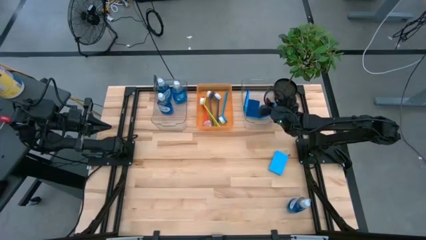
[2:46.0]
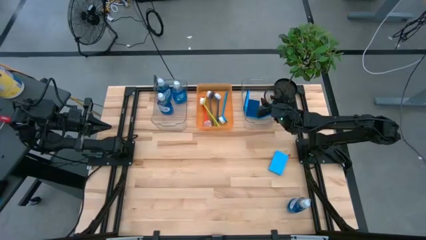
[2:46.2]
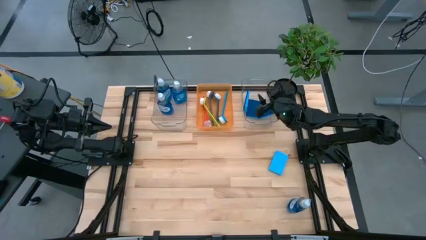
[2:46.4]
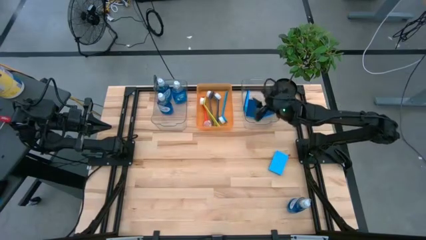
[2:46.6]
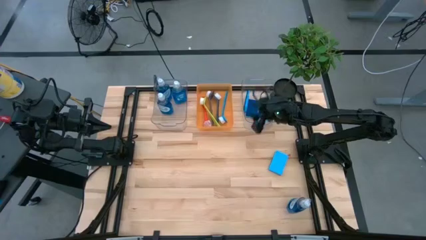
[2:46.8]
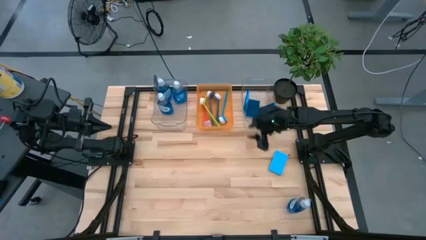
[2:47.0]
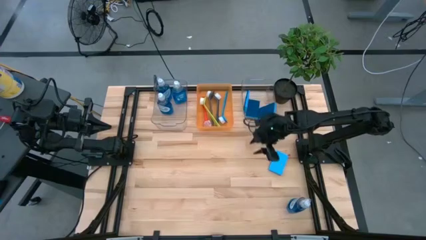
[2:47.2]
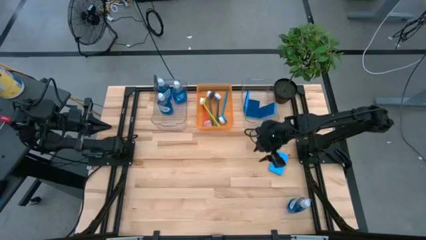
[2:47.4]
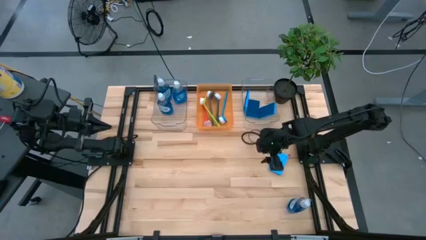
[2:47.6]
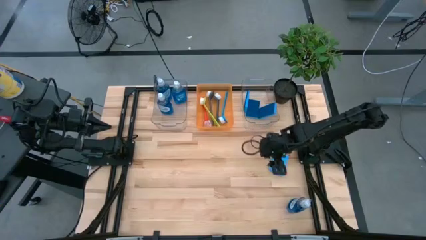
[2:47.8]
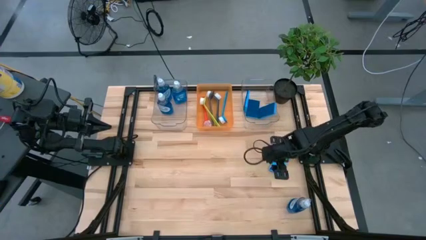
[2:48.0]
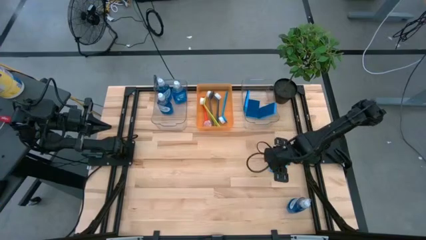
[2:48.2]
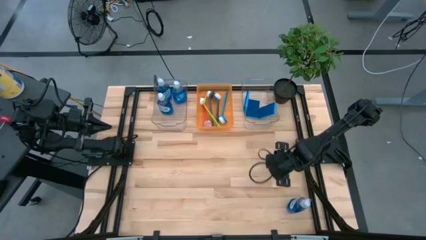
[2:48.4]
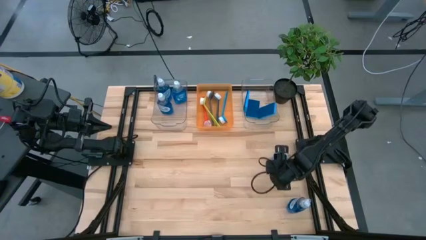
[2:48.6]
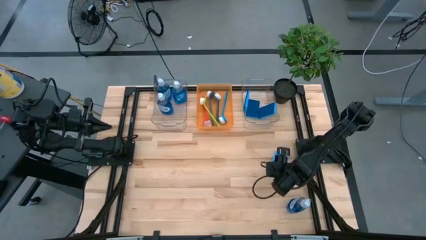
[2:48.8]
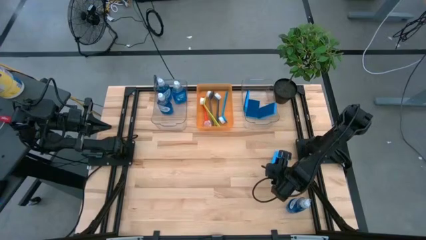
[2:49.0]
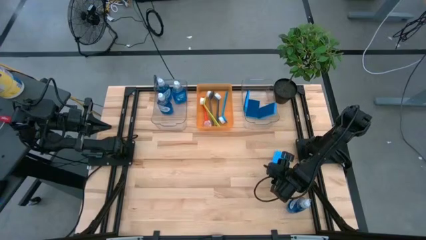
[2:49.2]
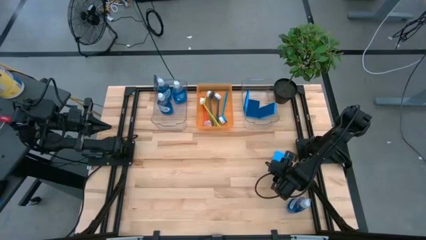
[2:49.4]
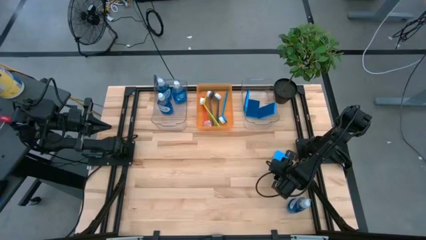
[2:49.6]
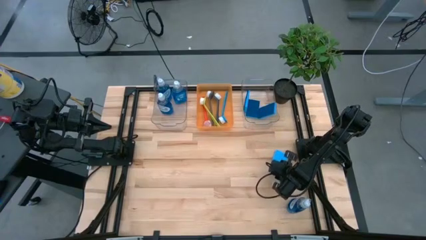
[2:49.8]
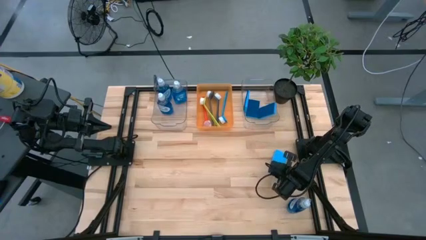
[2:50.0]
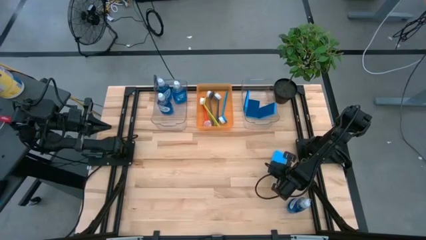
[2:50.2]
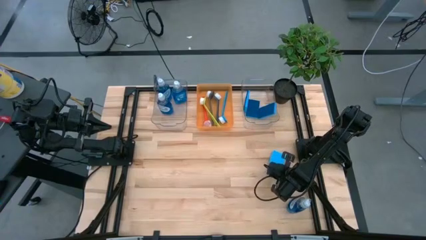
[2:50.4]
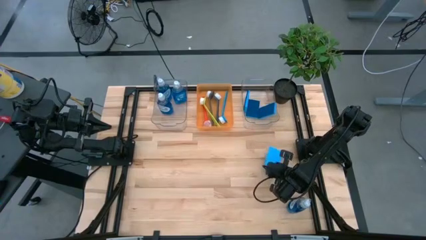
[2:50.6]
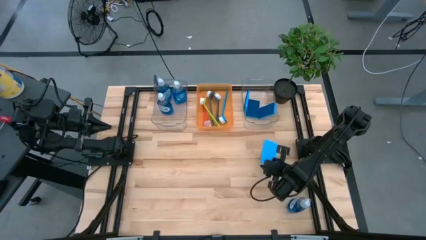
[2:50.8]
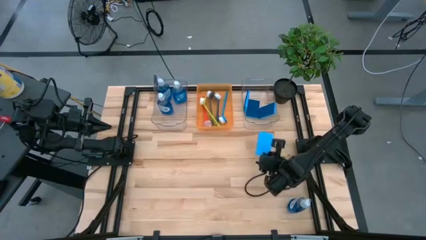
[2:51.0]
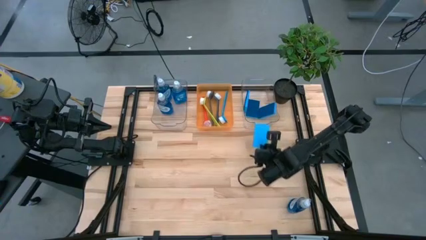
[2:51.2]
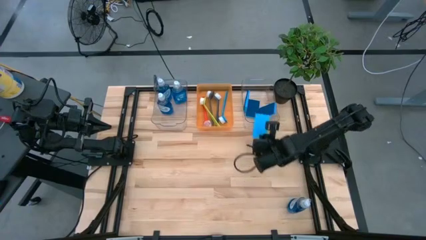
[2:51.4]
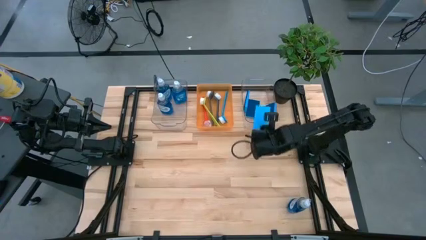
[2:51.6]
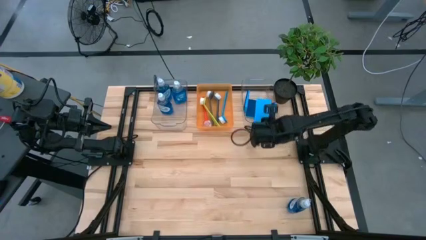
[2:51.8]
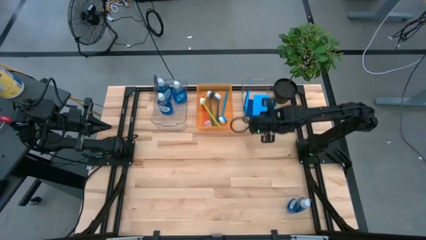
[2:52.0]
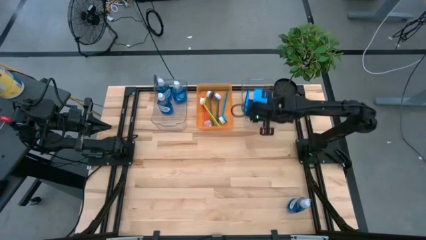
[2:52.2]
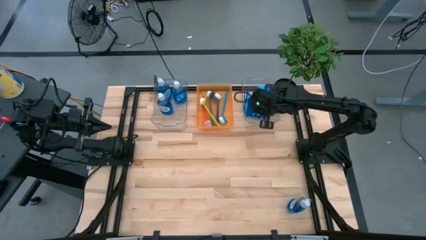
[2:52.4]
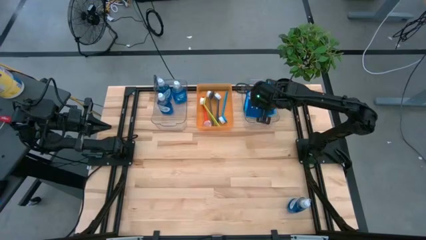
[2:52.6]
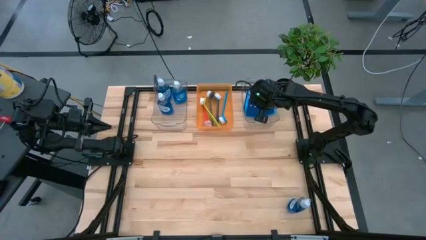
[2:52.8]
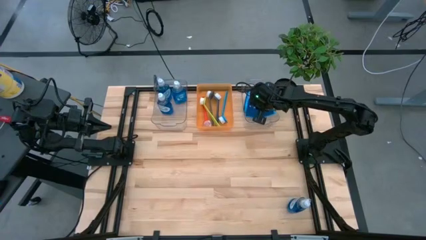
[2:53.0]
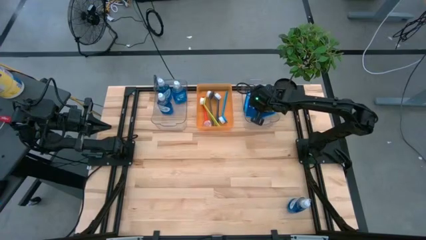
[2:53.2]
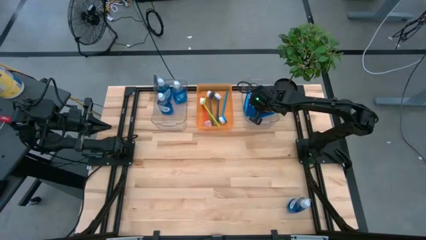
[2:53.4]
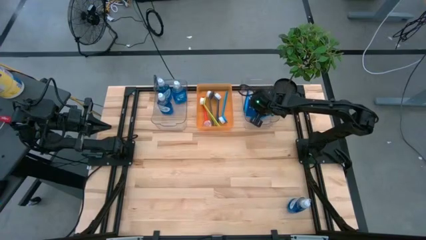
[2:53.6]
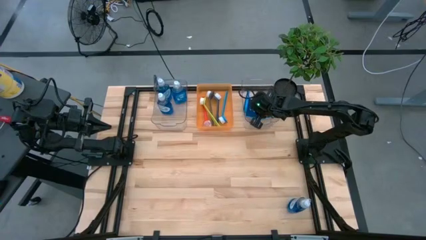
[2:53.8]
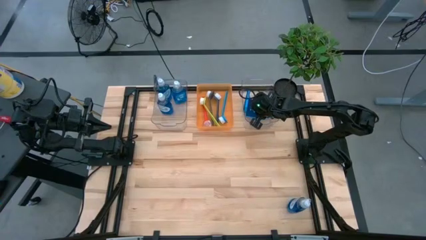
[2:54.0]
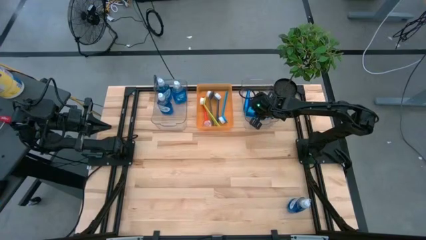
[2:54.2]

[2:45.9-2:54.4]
Task: Pick & Place Kitchen Sink Supplies
Put the blue sponge into the right transparent bin

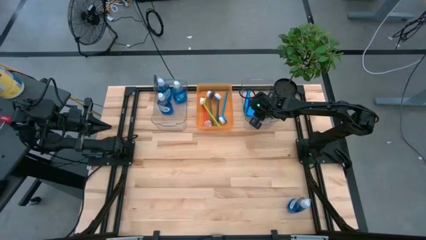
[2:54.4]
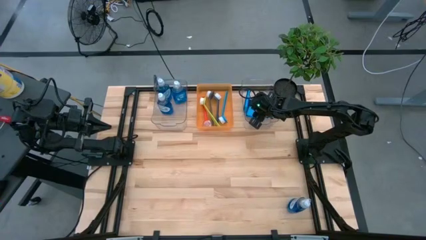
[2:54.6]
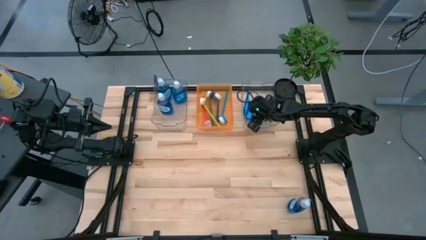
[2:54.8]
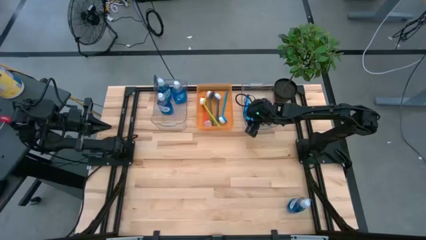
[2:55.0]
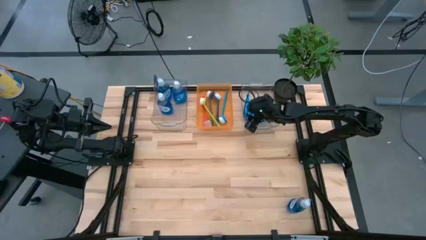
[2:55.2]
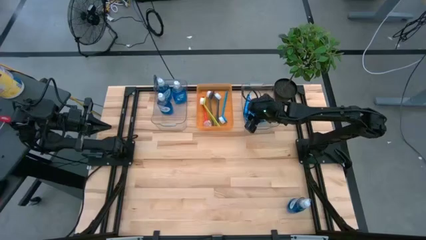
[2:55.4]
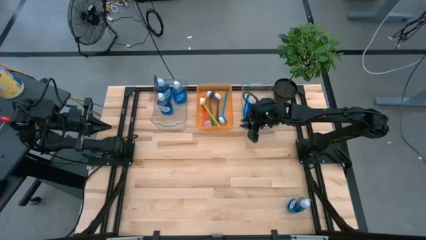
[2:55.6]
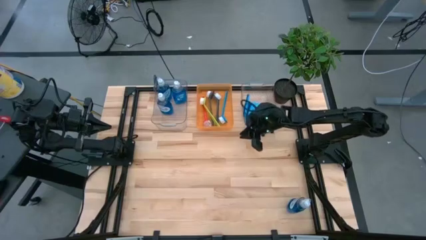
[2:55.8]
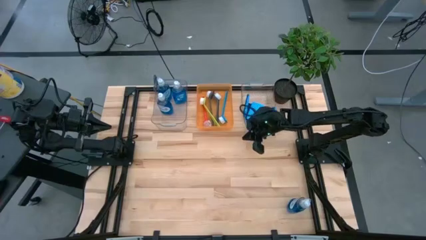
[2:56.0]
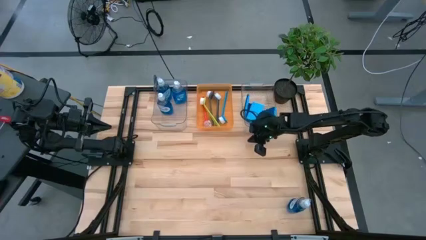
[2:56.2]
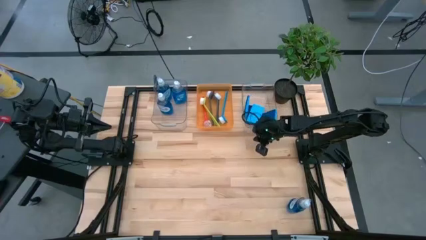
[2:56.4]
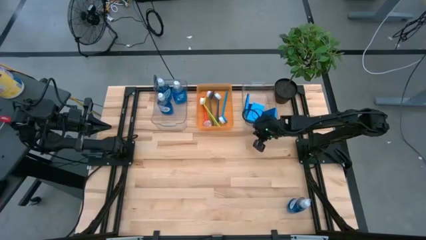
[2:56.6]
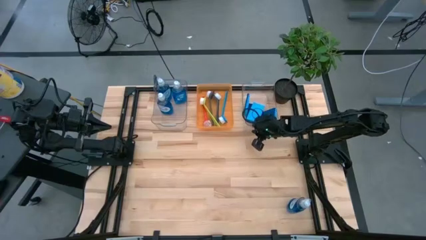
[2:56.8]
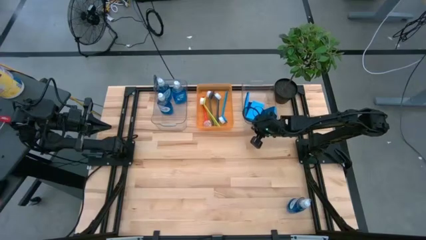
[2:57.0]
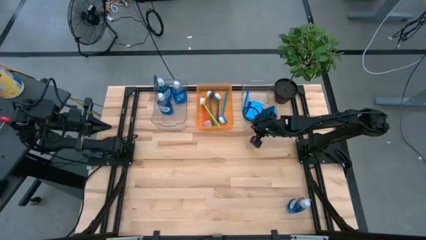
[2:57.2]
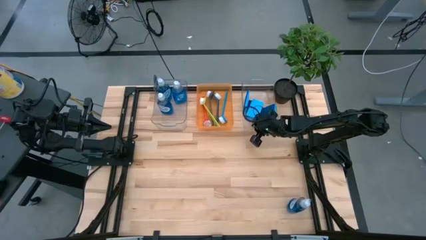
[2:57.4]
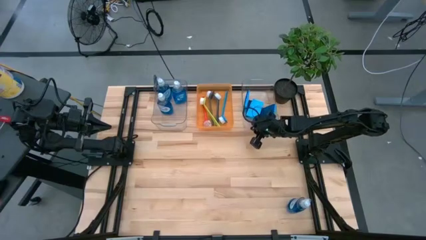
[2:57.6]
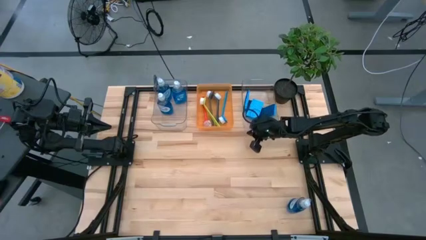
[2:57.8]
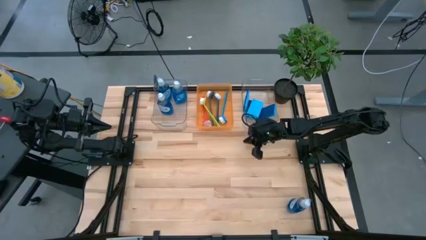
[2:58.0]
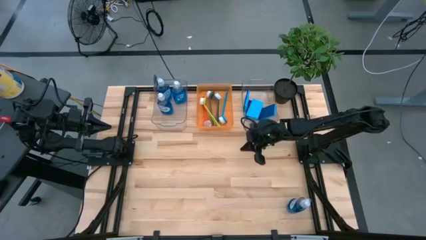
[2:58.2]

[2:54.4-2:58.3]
Adjust the right transparent bin
